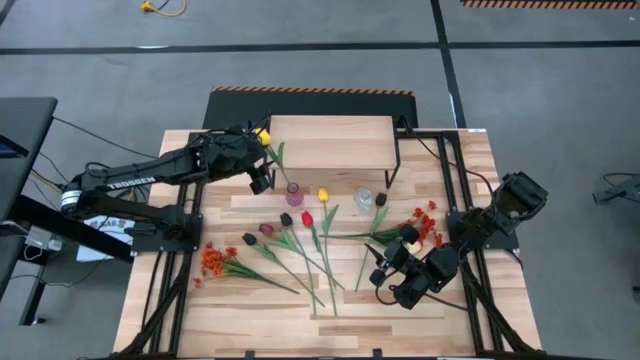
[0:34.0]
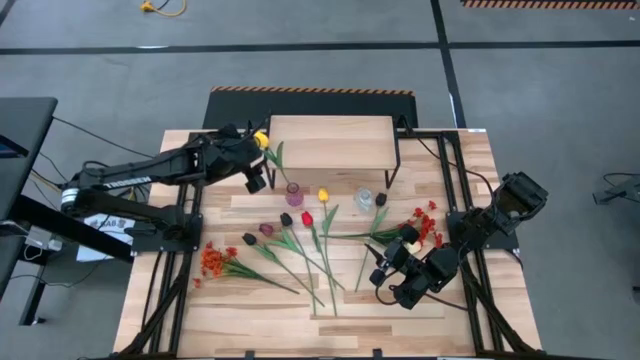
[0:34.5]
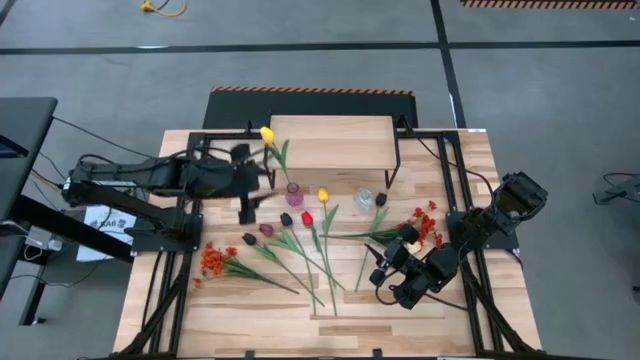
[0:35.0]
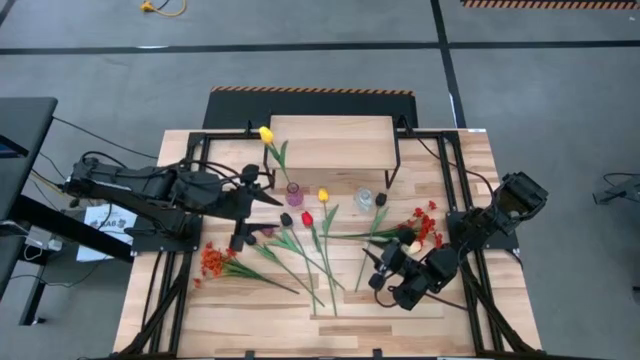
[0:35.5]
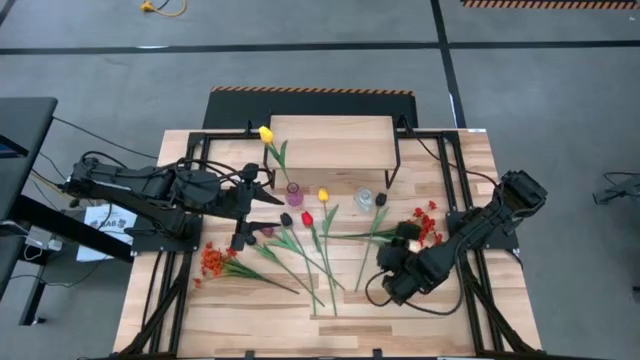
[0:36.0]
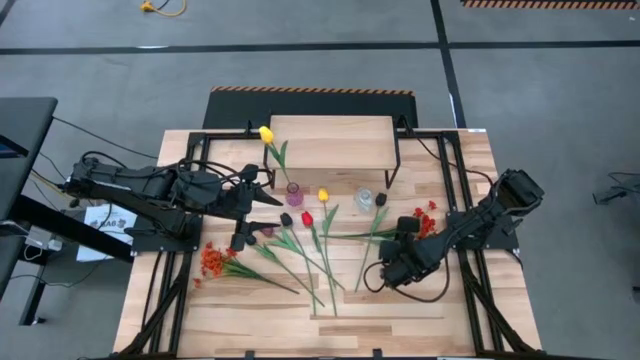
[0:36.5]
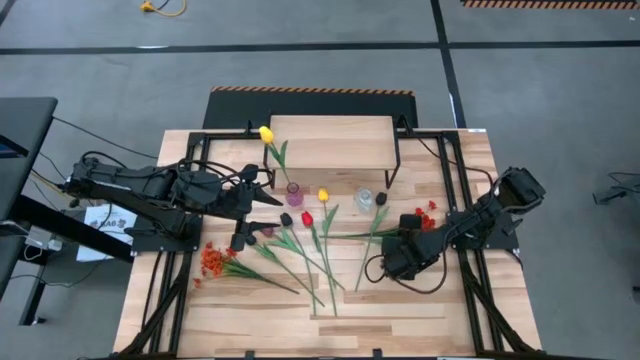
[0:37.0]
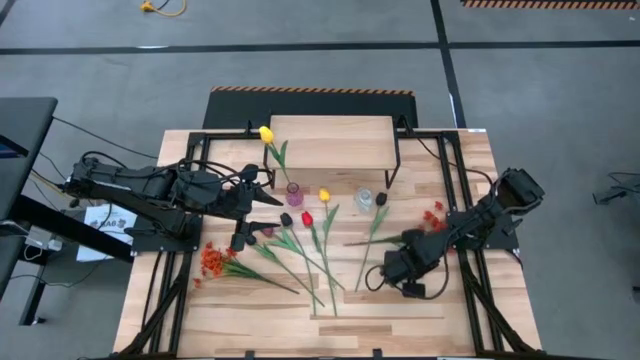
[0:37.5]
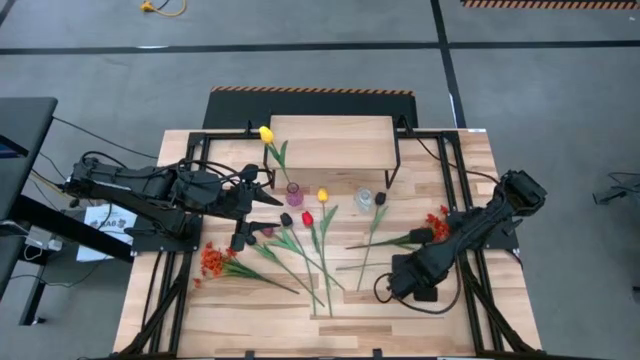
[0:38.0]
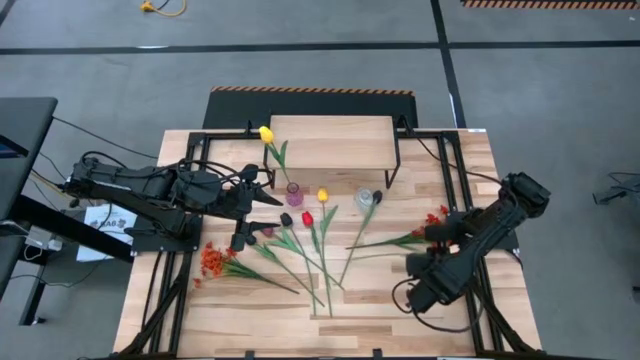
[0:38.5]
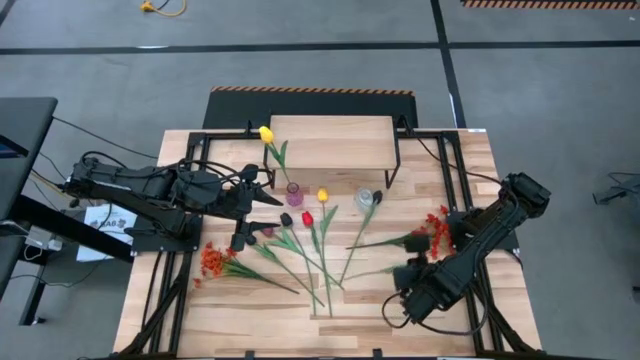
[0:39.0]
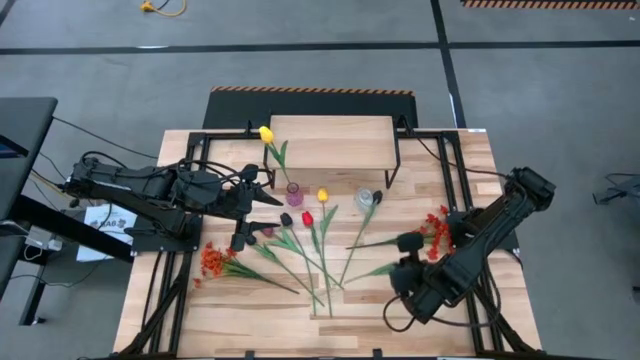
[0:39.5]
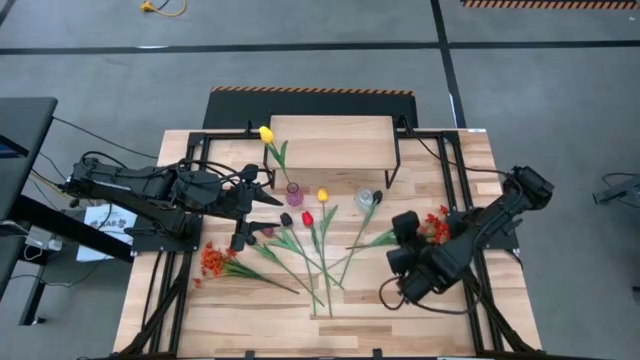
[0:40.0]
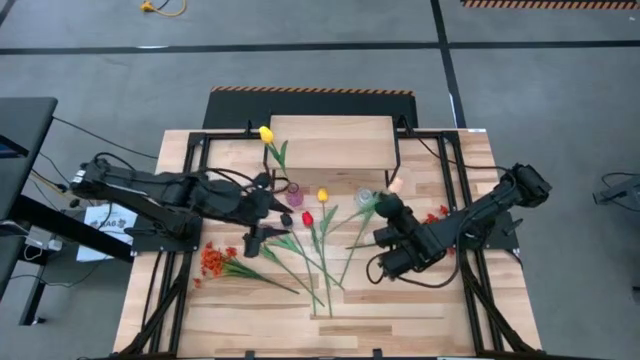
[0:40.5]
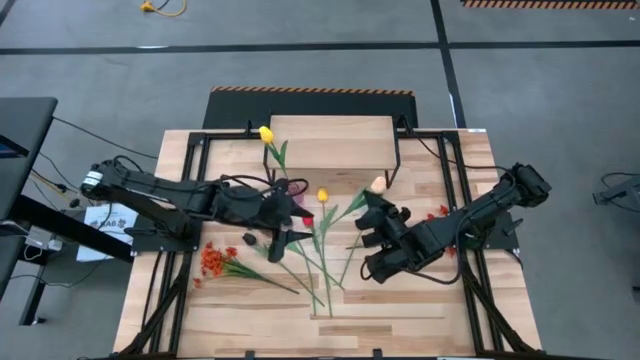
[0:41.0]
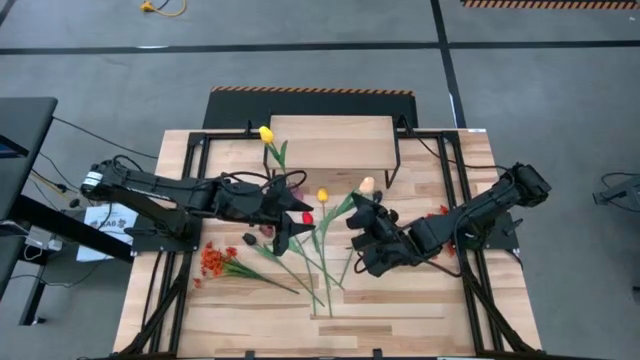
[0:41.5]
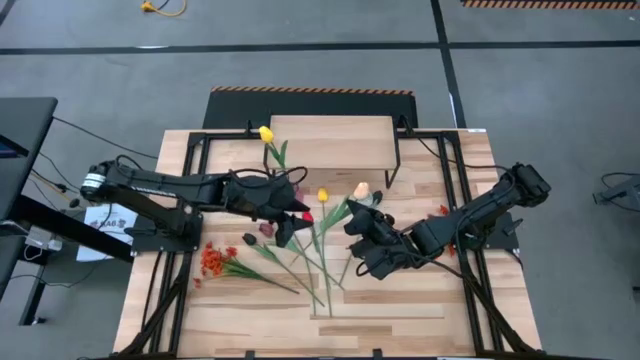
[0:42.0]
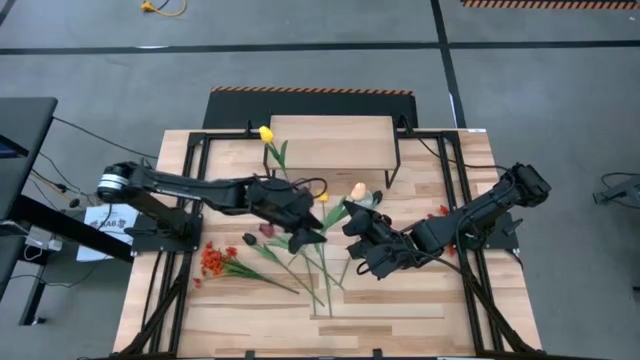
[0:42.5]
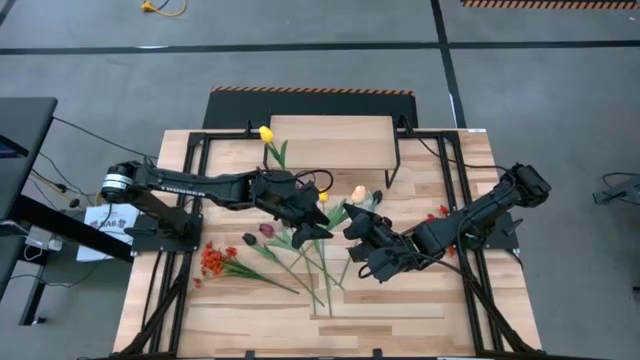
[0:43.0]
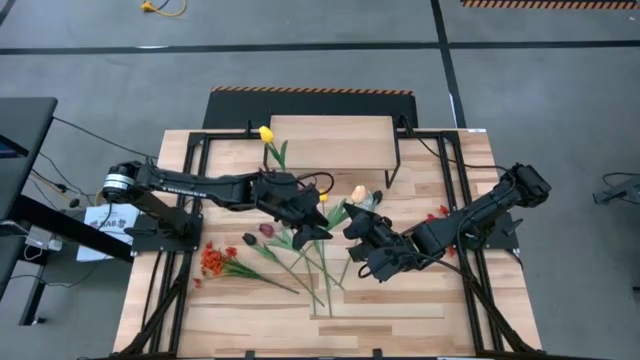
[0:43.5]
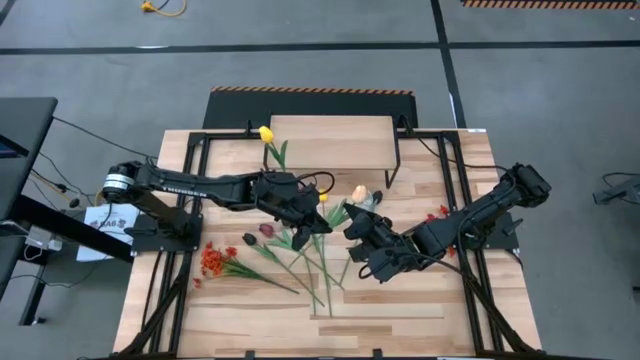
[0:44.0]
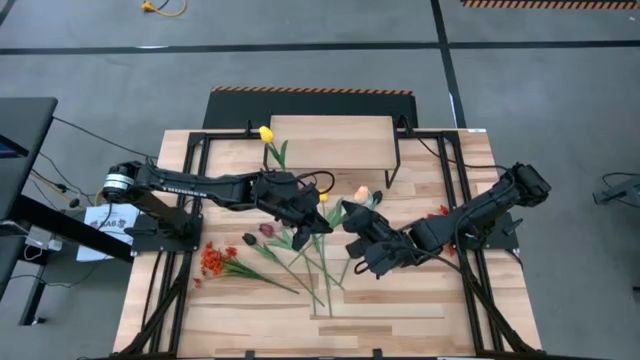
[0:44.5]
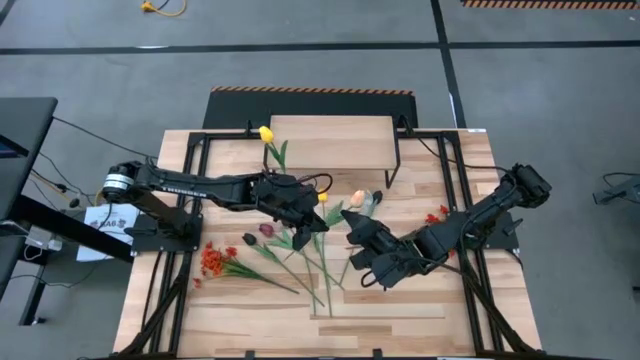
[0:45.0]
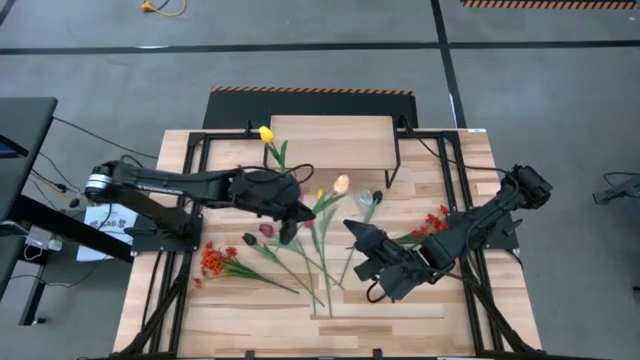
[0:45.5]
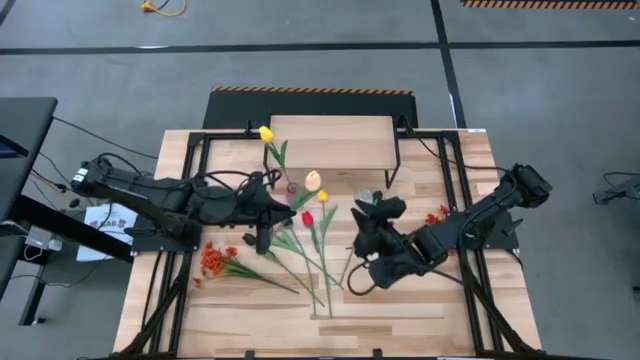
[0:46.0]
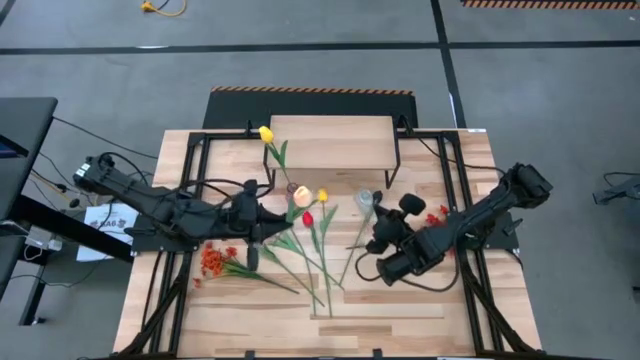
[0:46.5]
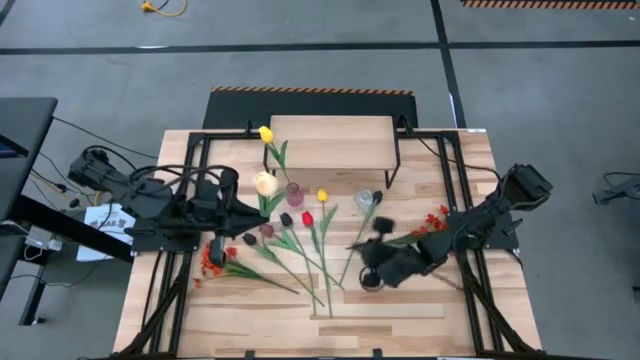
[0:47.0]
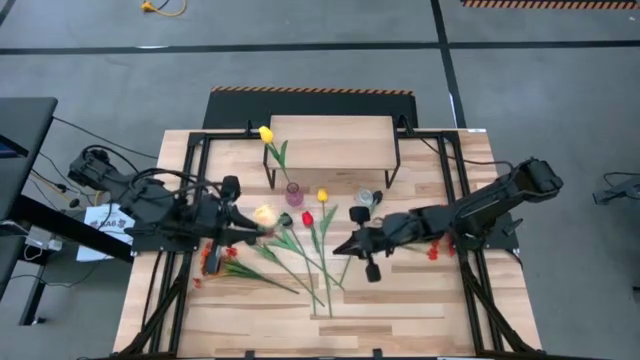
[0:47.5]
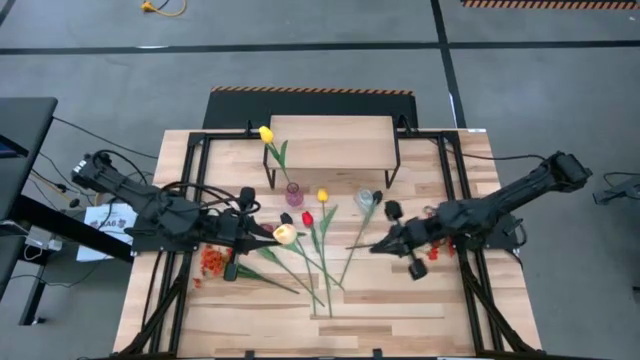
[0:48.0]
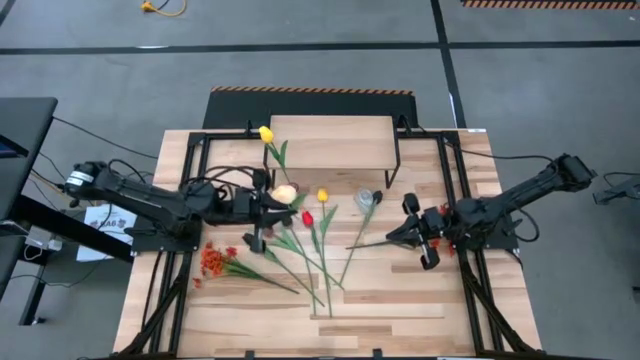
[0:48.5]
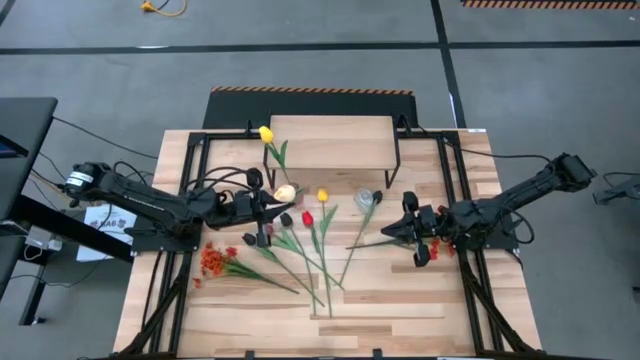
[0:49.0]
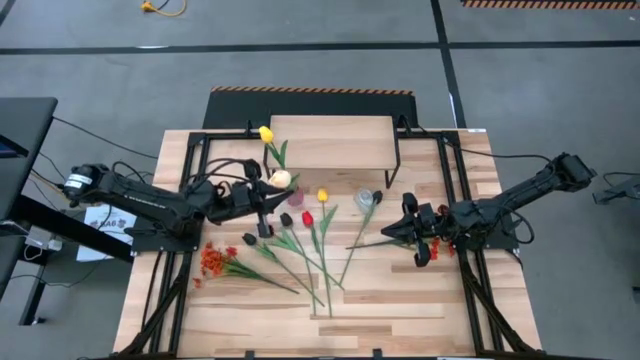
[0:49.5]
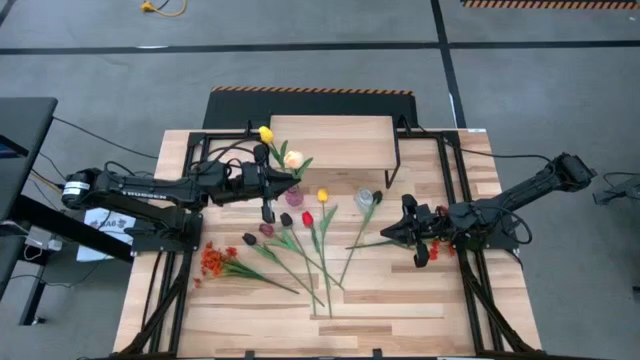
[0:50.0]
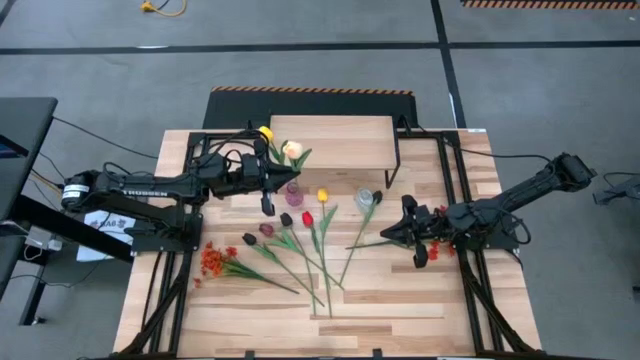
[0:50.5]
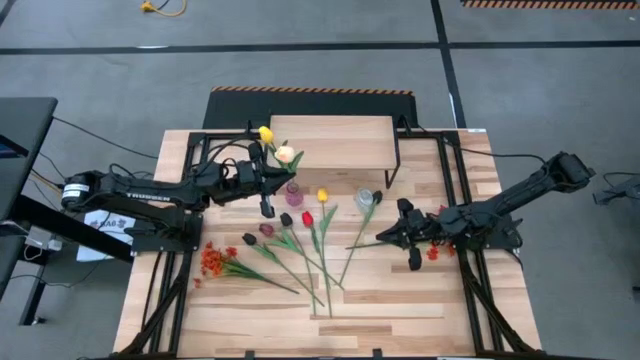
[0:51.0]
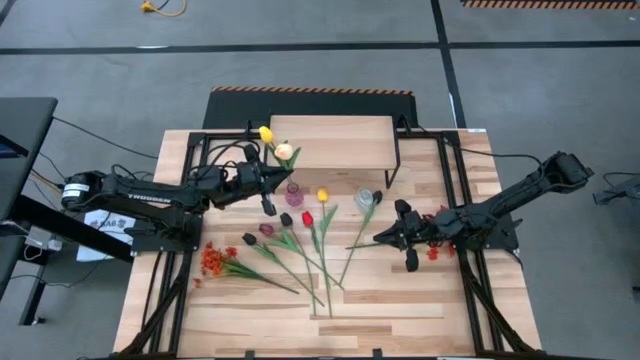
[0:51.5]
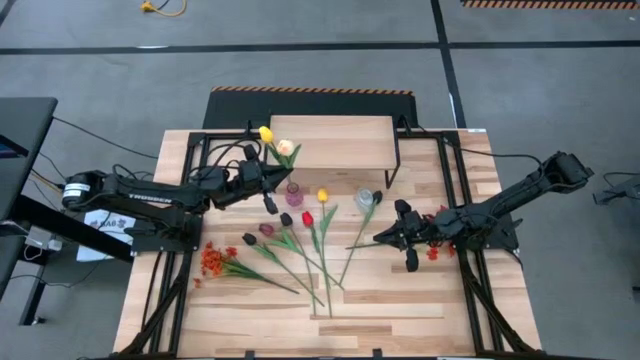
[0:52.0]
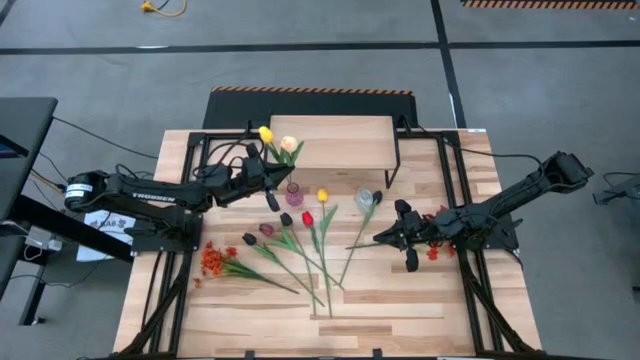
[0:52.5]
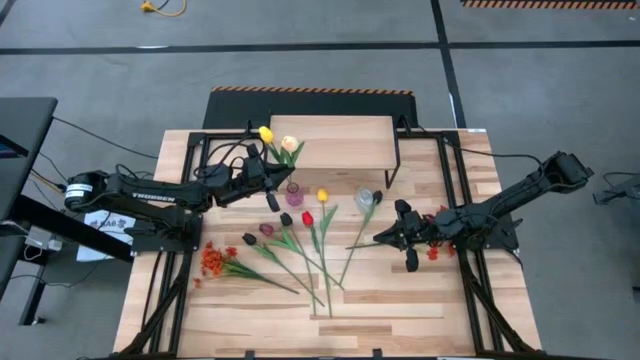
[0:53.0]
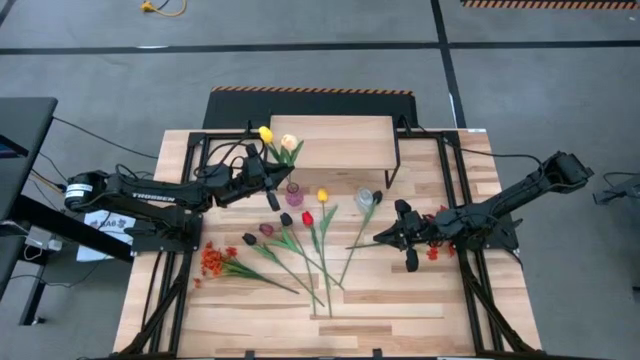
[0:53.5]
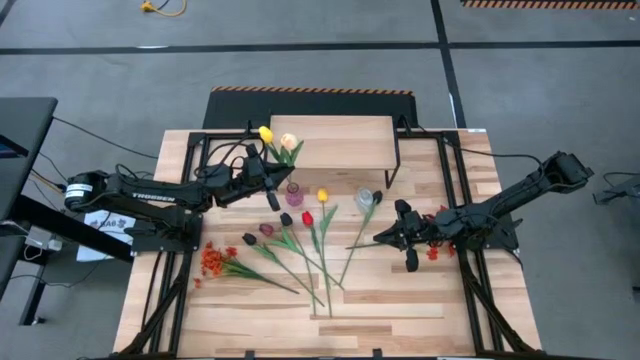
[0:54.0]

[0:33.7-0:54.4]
Task: Pick and place flowers into a vace then onto a shelf
Put the white tulip into the violet vase
